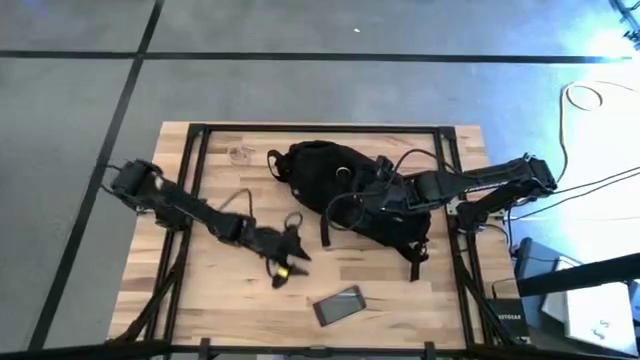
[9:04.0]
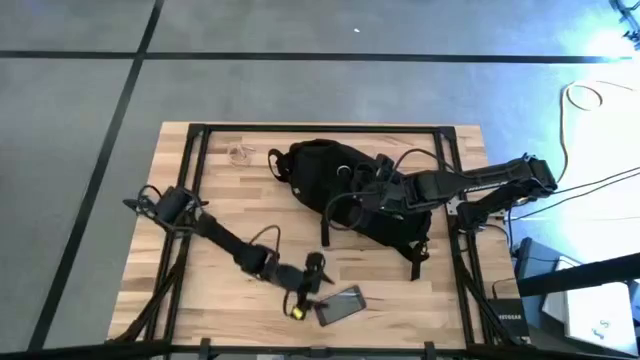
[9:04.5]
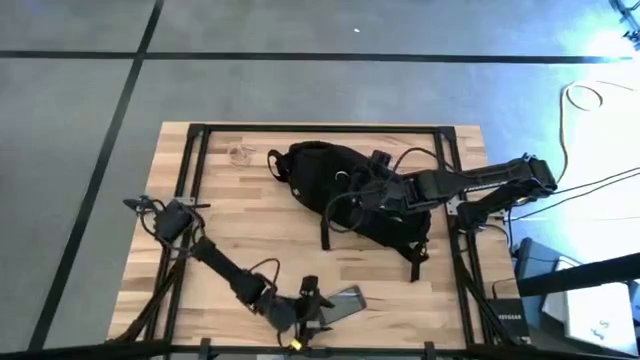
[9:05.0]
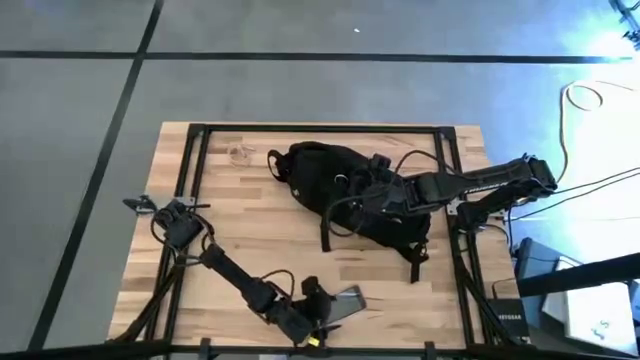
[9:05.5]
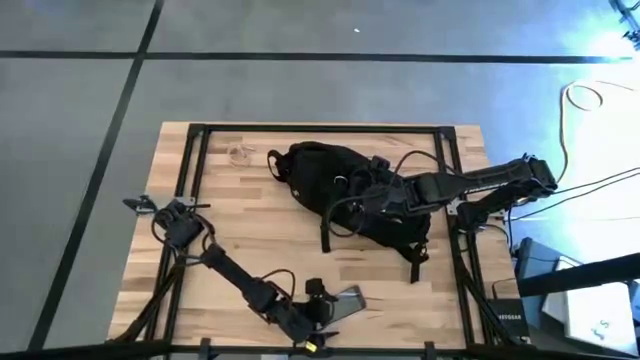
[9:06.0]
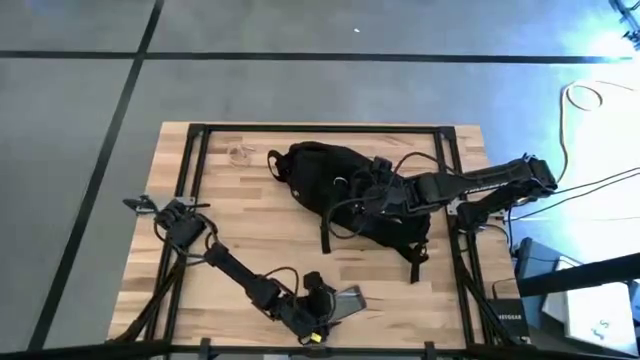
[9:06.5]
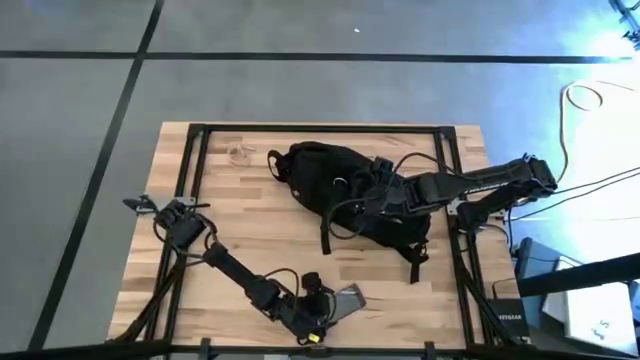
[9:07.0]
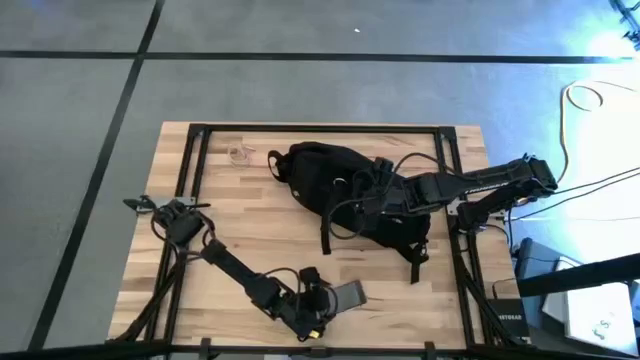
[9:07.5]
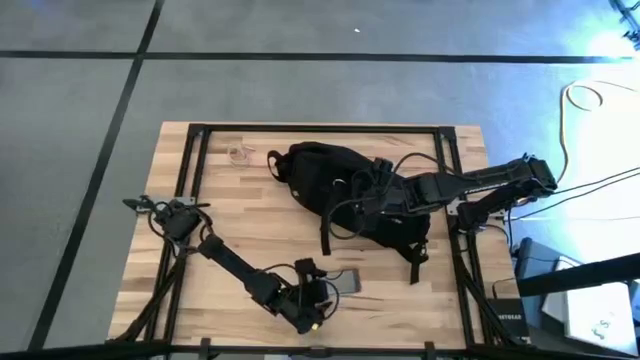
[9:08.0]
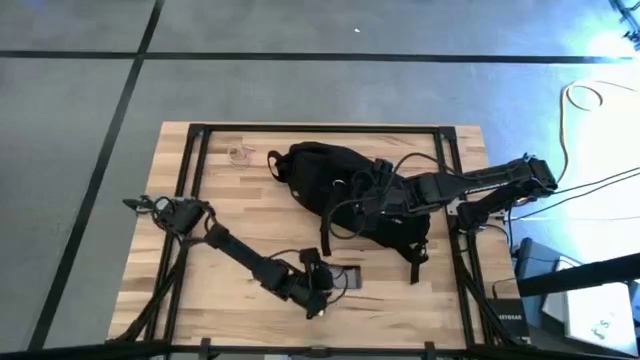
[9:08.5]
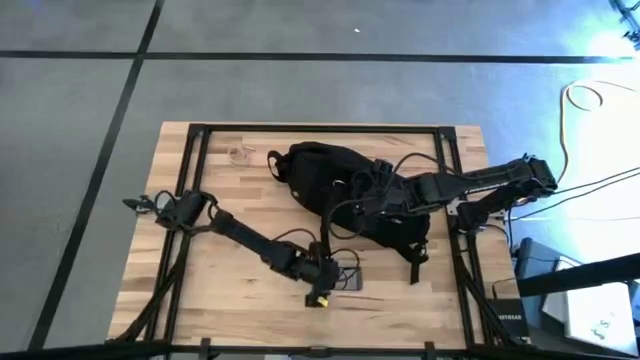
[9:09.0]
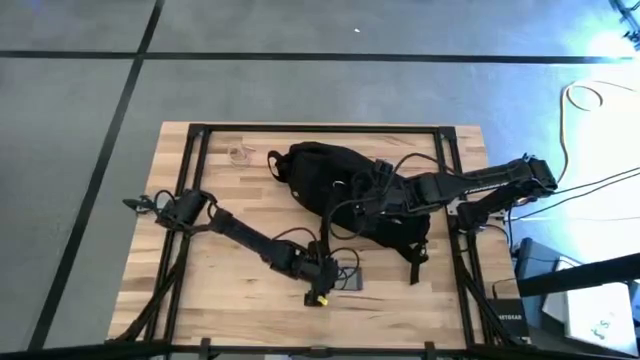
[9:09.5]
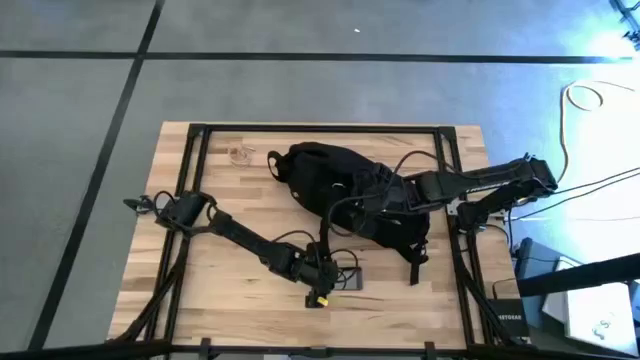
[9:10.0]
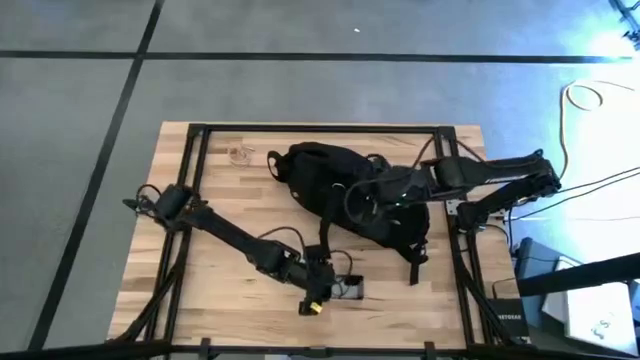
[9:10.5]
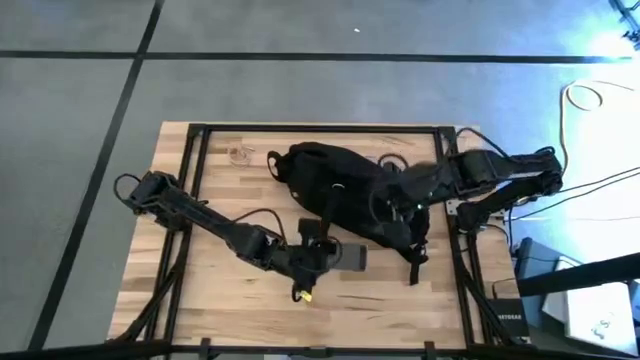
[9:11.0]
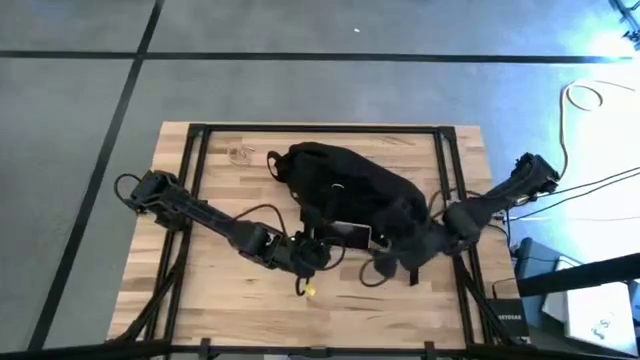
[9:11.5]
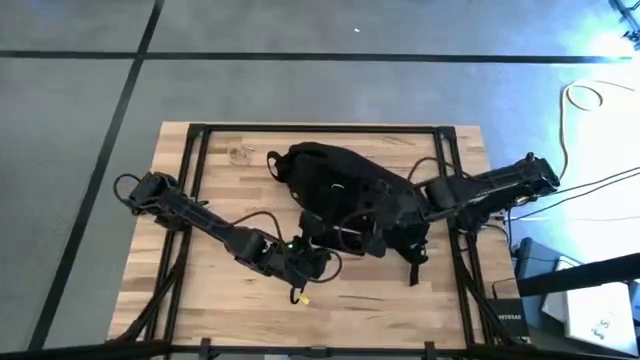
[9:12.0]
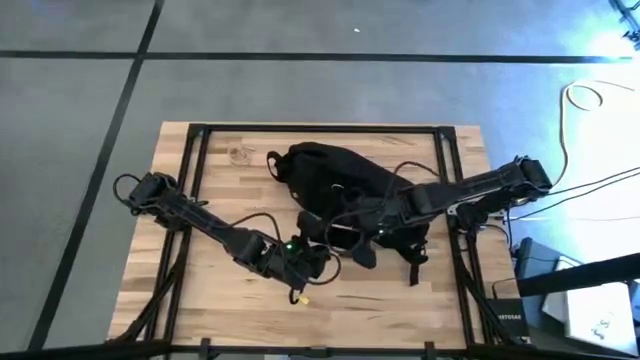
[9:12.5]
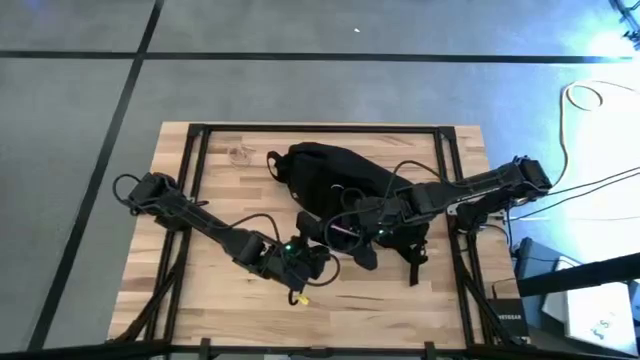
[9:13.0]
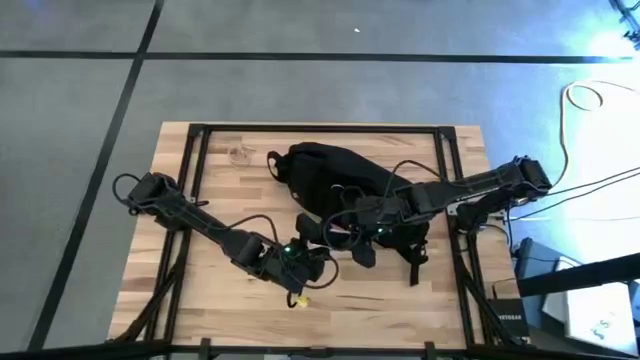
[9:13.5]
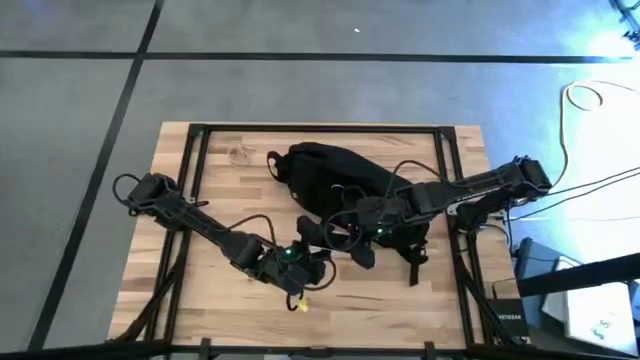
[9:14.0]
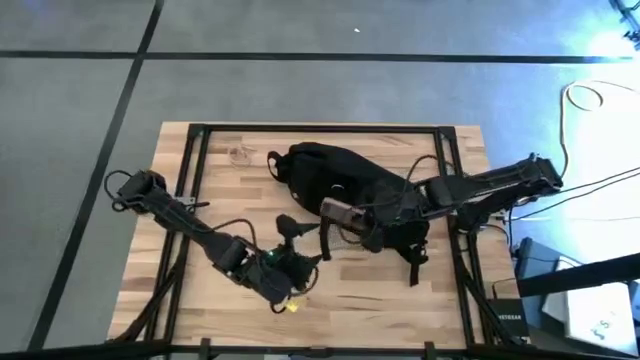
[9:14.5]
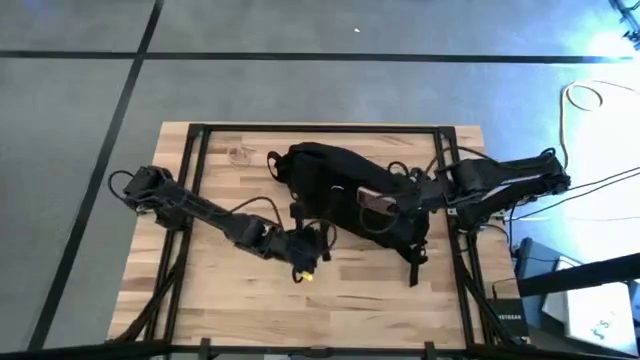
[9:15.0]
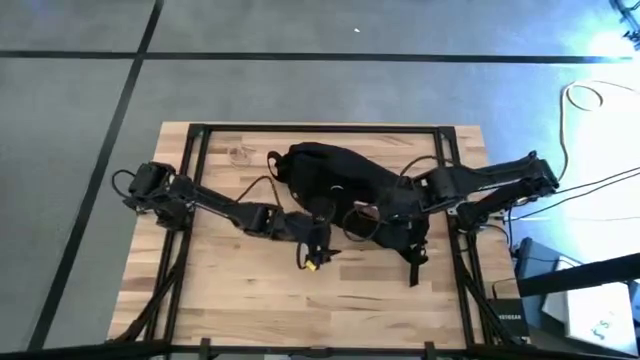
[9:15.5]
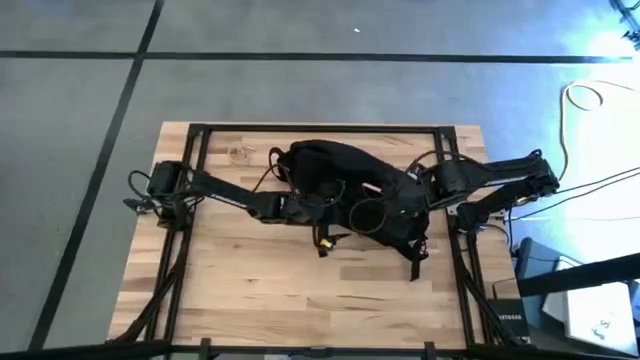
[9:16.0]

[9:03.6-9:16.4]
Task: Unpack backpack
Put the pink cellphone into the black backpack

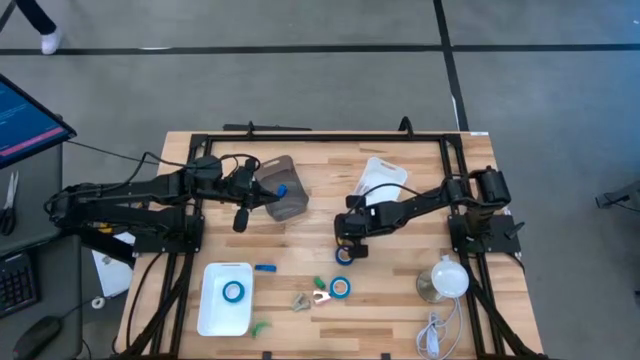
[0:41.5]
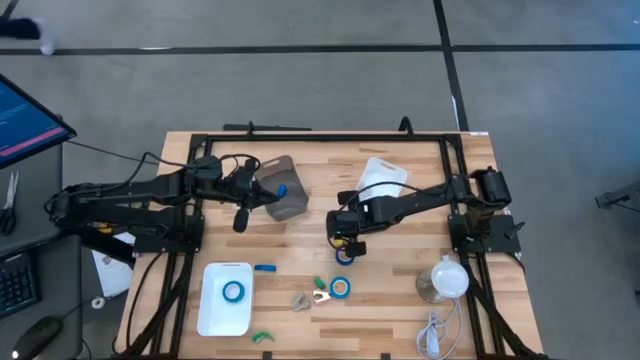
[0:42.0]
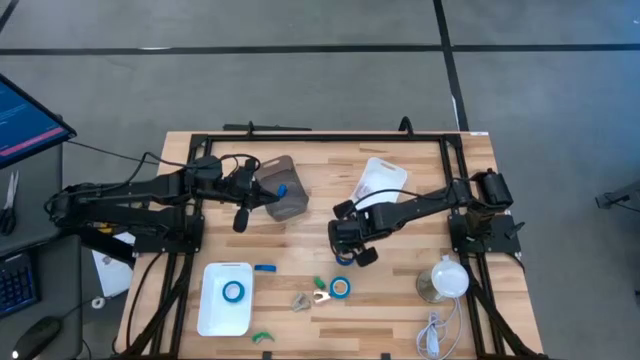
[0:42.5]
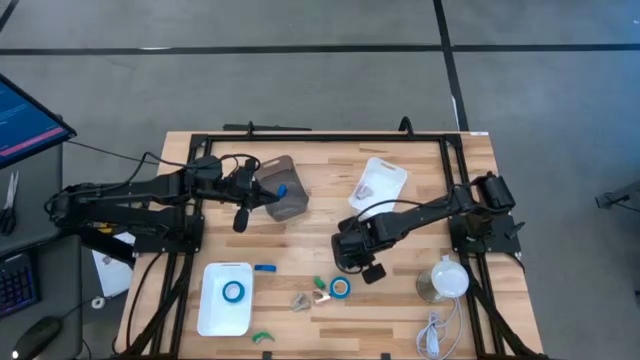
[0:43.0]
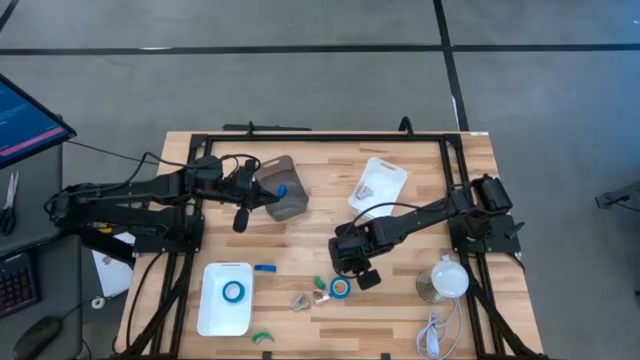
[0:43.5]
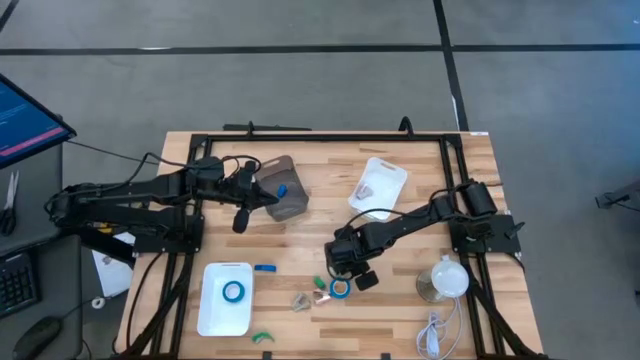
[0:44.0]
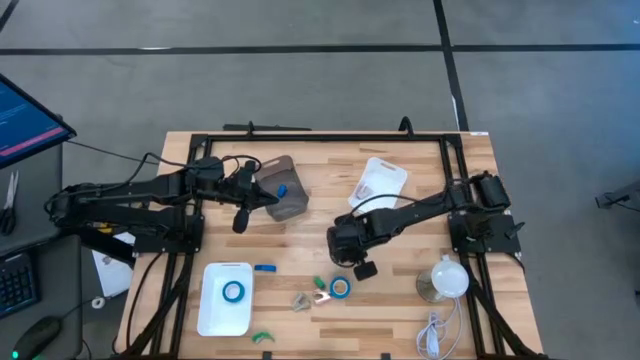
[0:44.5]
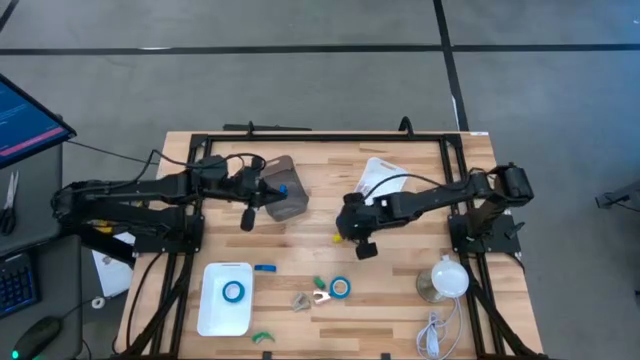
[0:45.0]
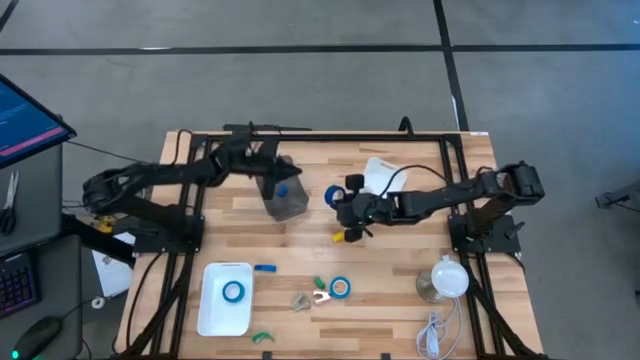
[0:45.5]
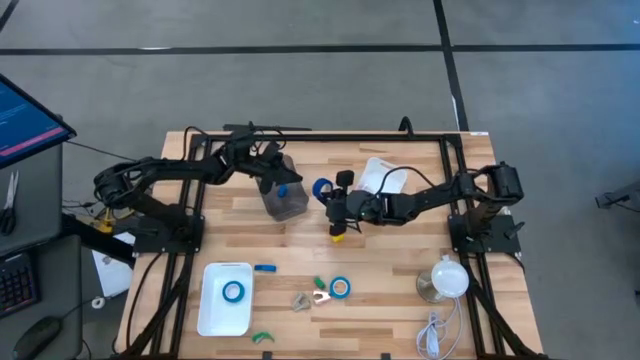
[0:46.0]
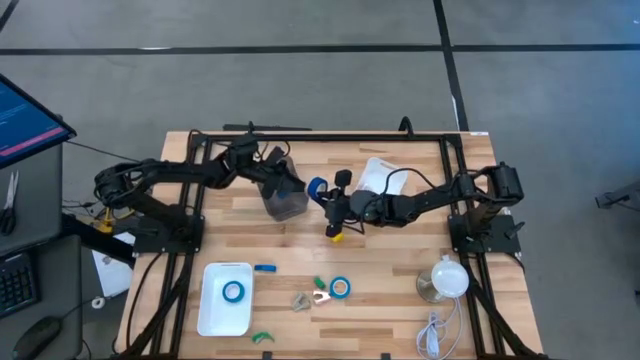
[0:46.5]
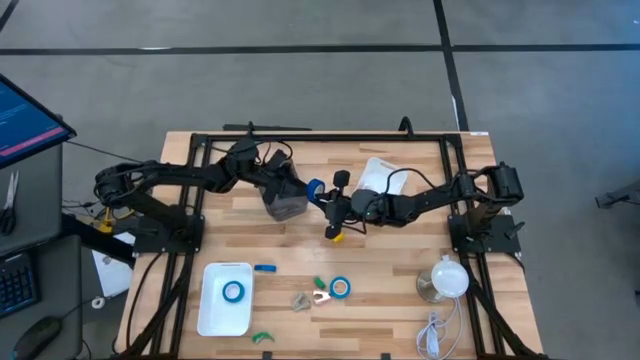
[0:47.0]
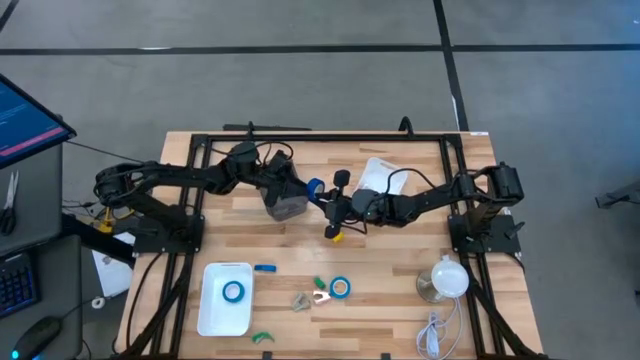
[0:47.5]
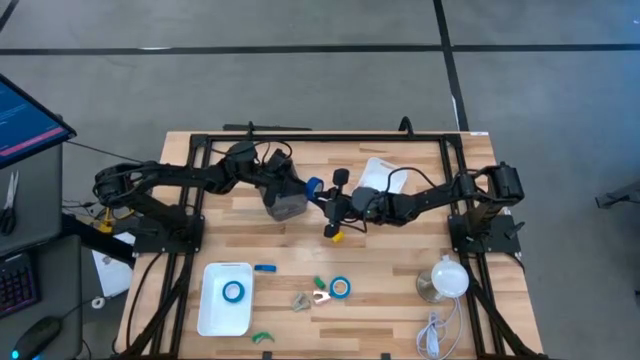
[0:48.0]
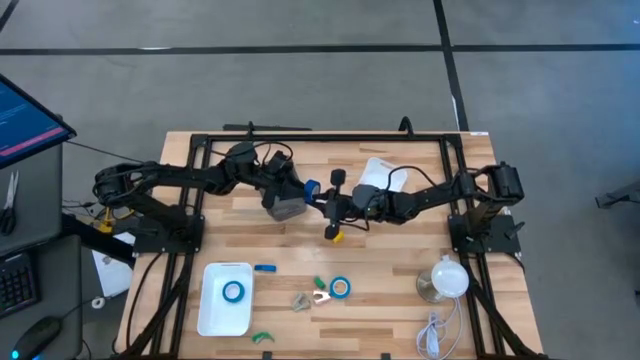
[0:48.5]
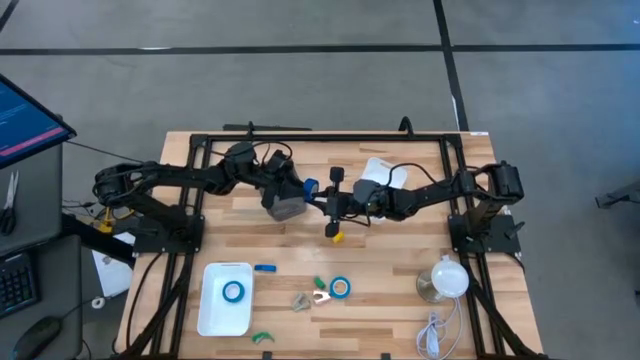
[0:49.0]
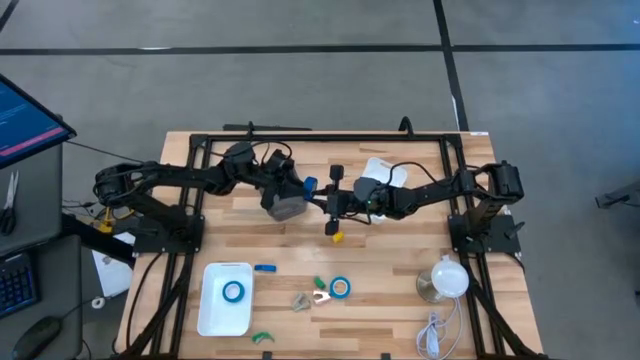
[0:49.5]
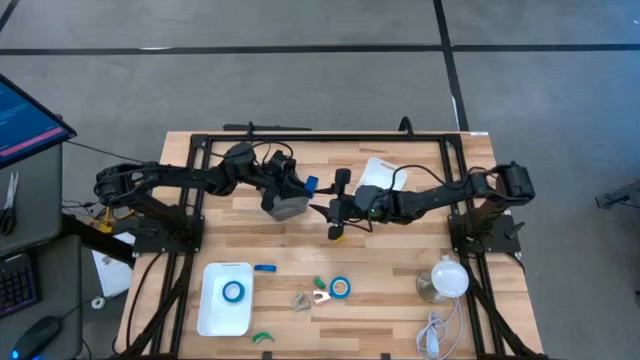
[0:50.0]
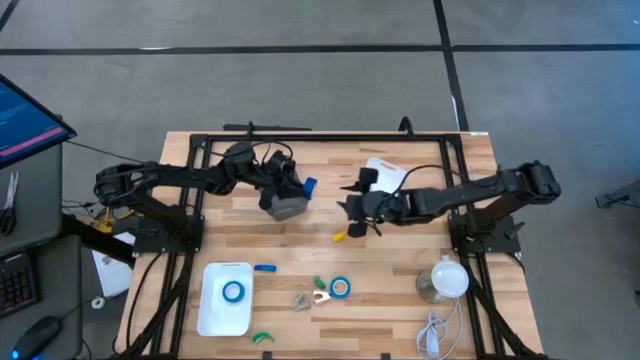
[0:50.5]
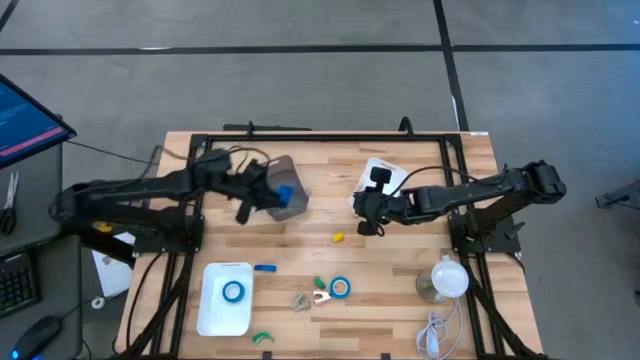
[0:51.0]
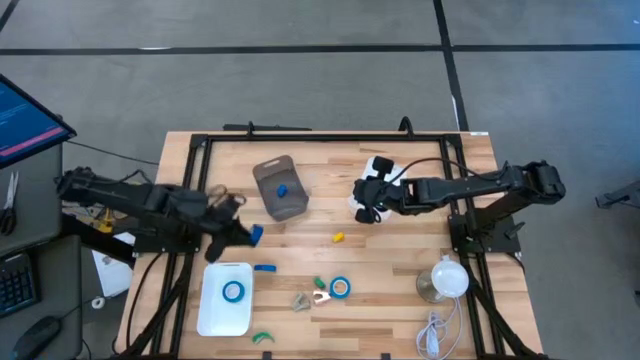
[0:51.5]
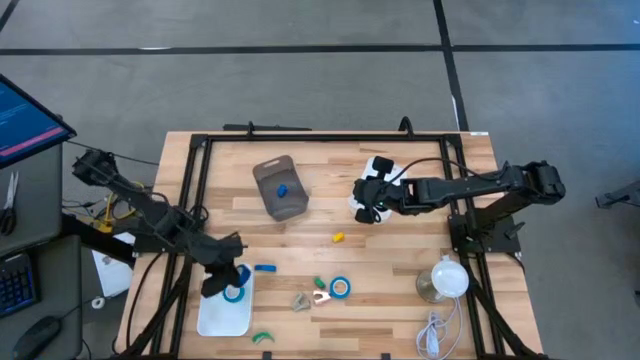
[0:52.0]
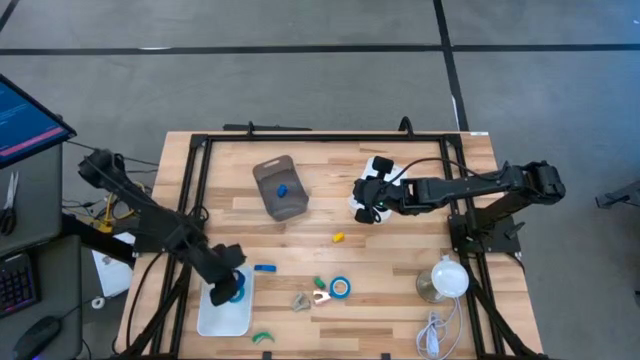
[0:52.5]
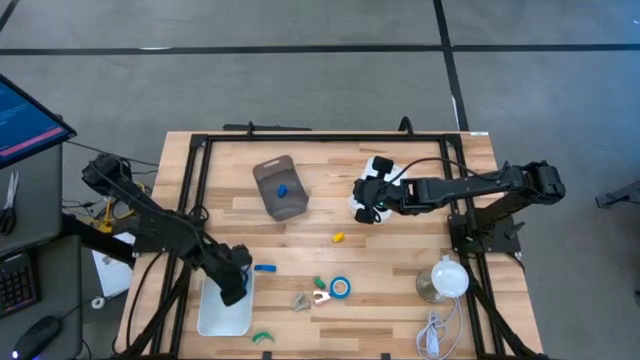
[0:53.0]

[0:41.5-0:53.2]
Task: Pick and place Stapler, Stapler remover, tape
Put the blue tape into the bottom white bin
